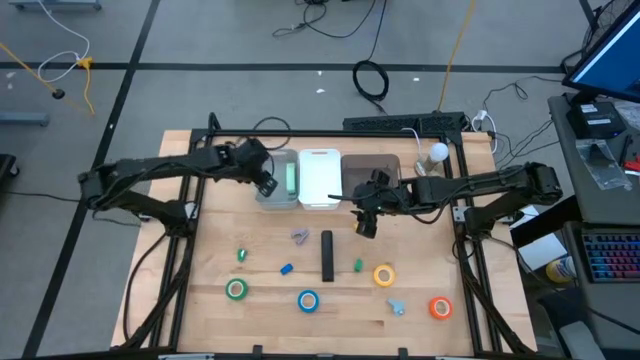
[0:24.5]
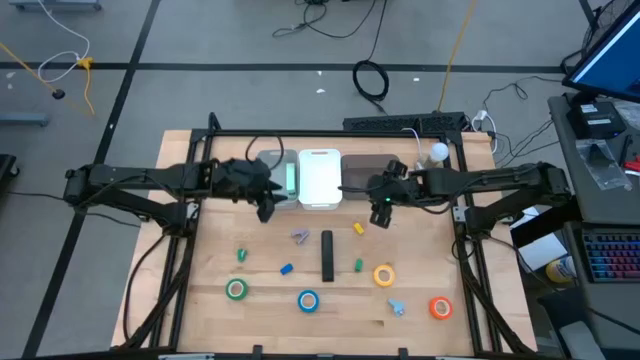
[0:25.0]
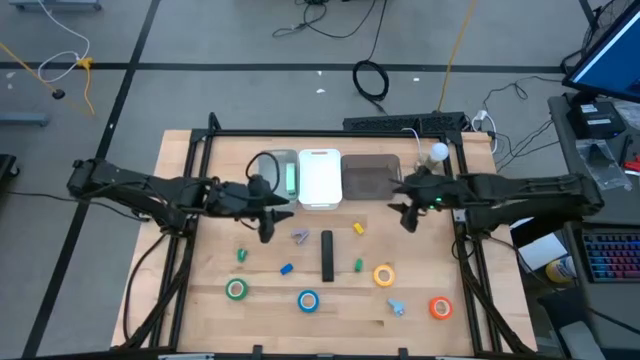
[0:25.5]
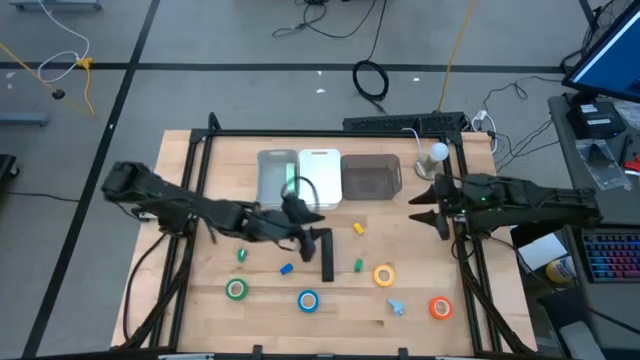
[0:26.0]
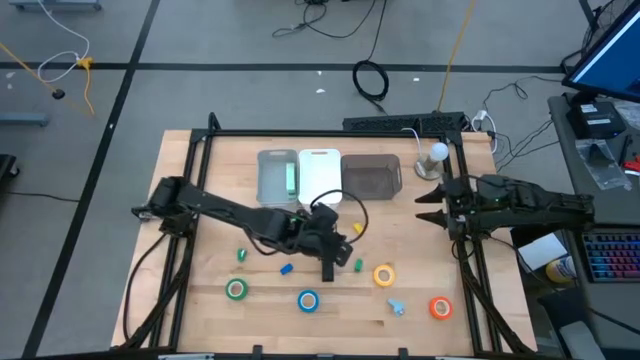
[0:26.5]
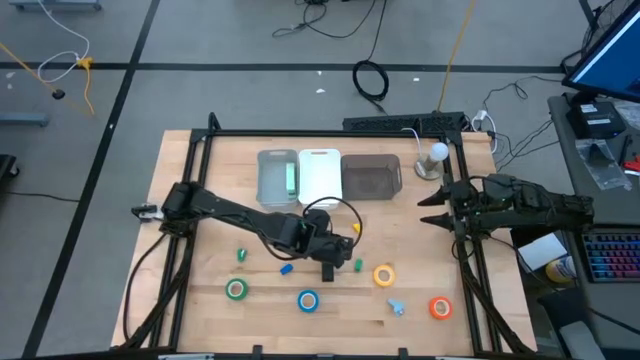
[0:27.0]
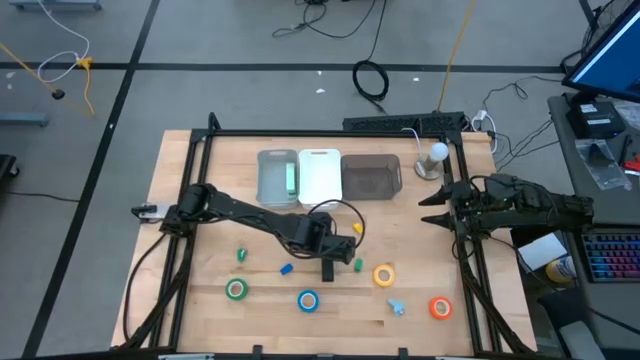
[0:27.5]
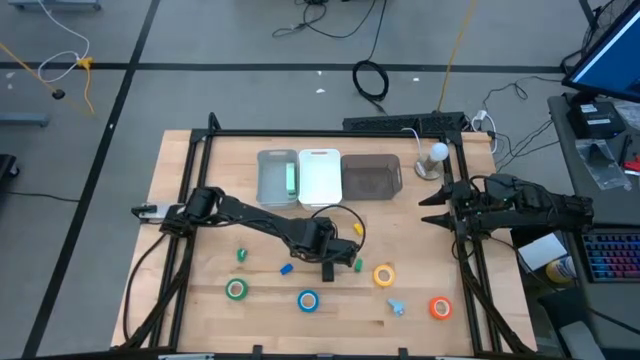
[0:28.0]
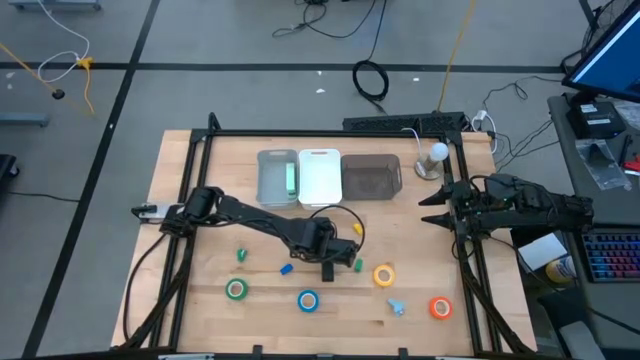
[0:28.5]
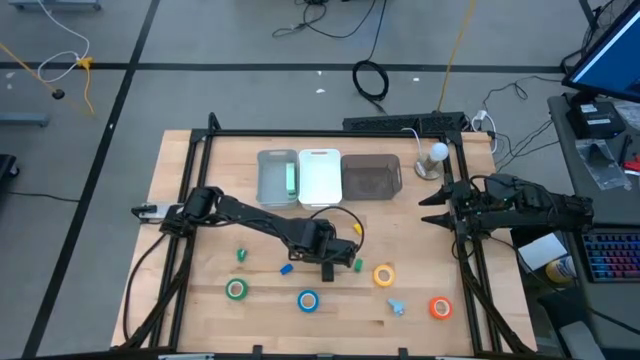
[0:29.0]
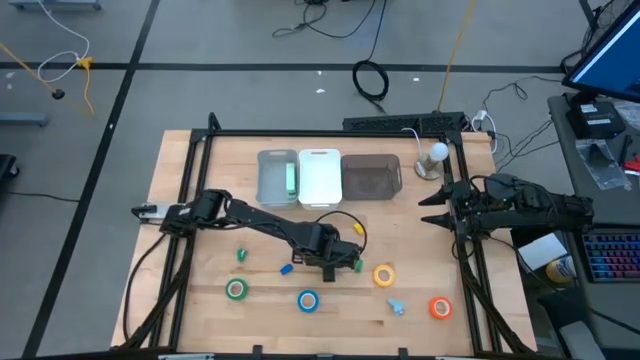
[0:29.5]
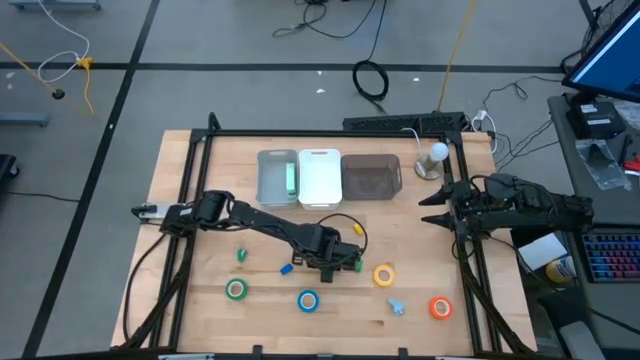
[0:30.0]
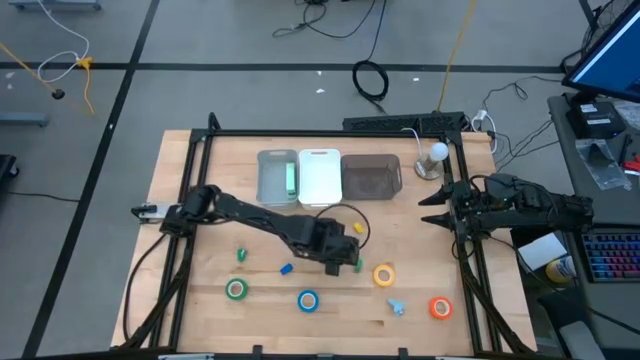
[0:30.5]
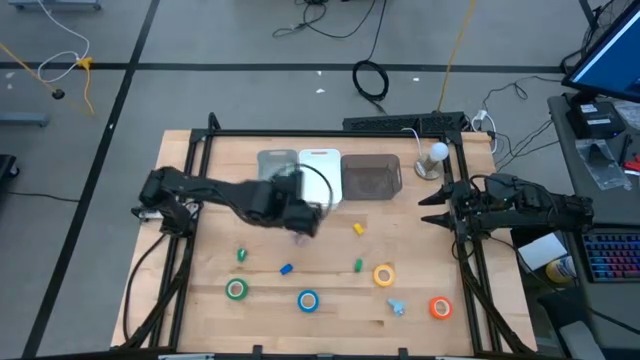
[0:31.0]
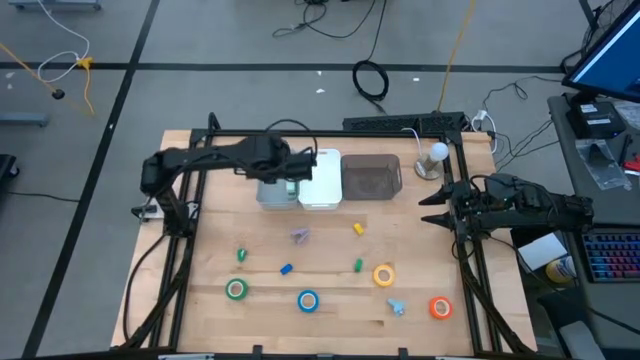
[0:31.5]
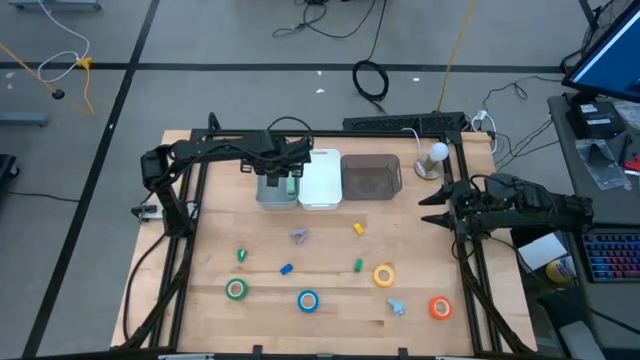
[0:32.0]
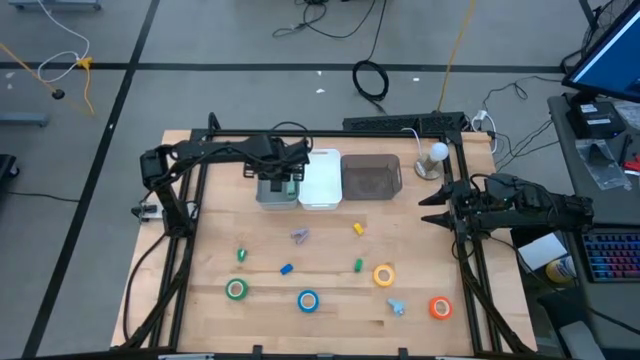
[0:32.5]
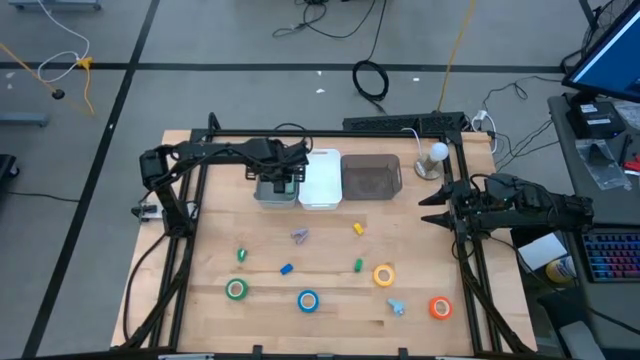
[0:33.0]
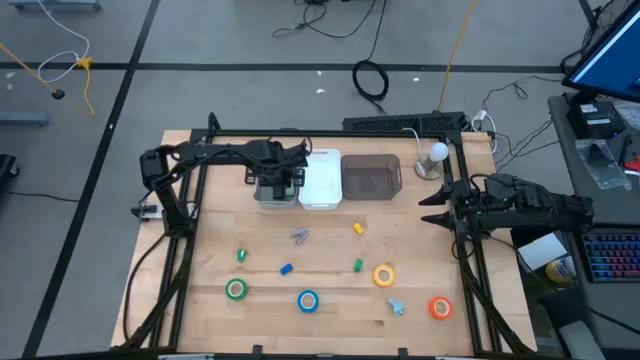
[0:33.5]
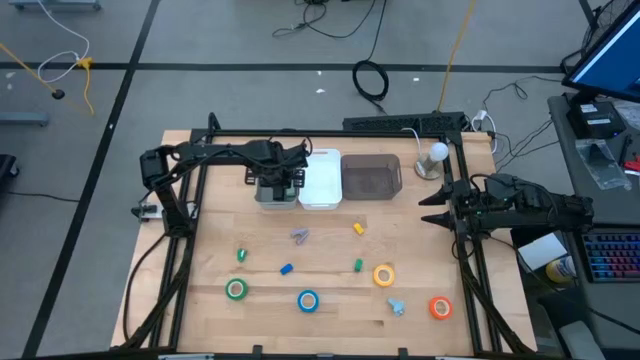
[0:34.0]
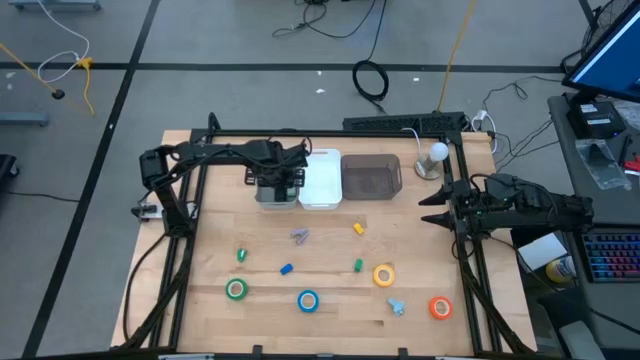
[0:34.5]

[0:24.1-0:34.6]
Task: Pick and place Stapler, Stapler remover, tape
Put the black stapler into the gray bin

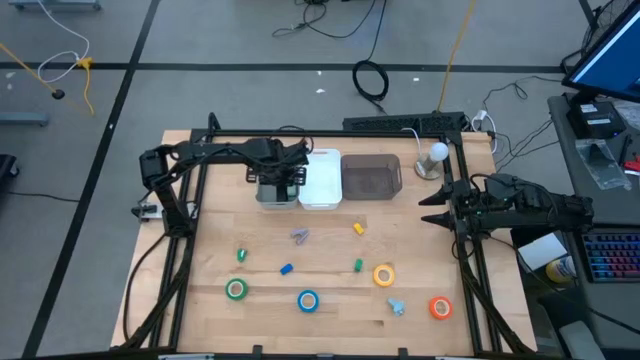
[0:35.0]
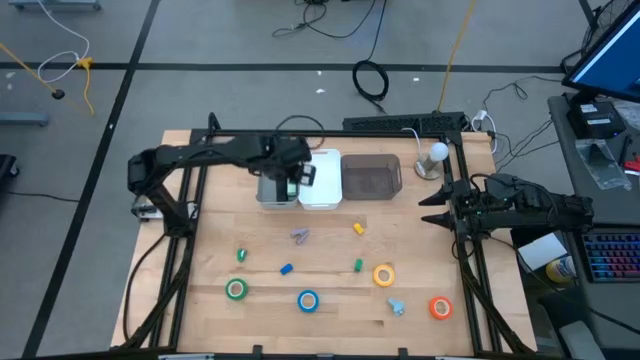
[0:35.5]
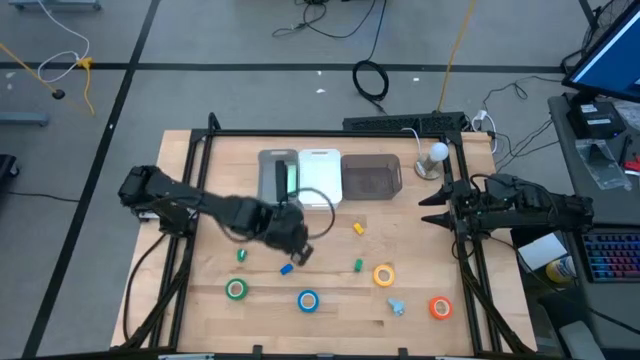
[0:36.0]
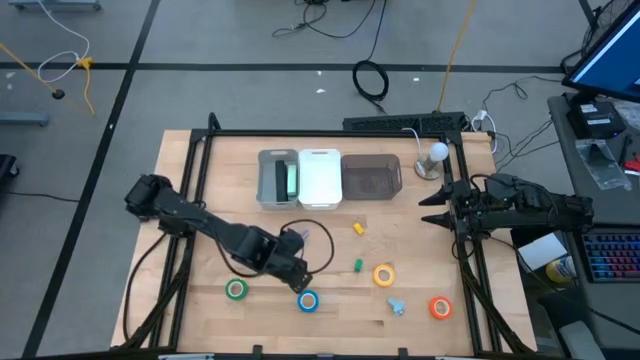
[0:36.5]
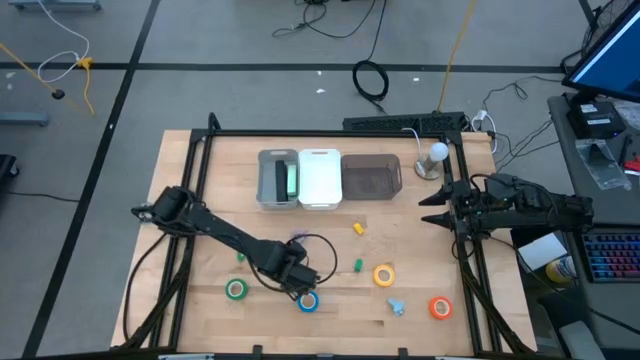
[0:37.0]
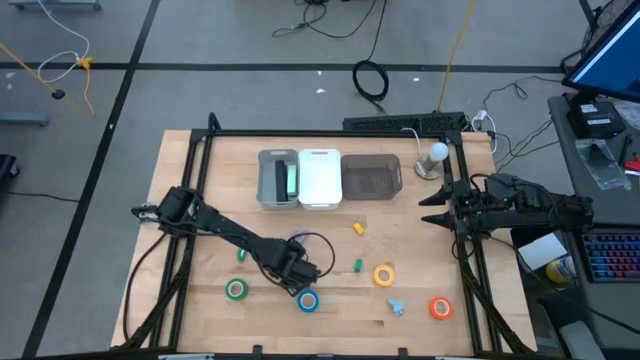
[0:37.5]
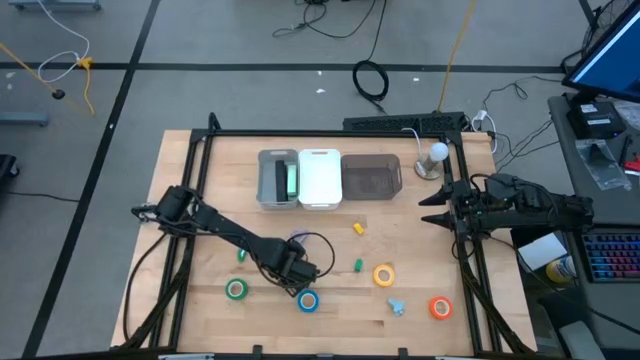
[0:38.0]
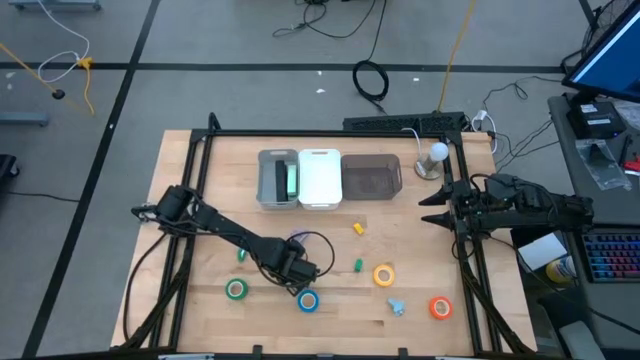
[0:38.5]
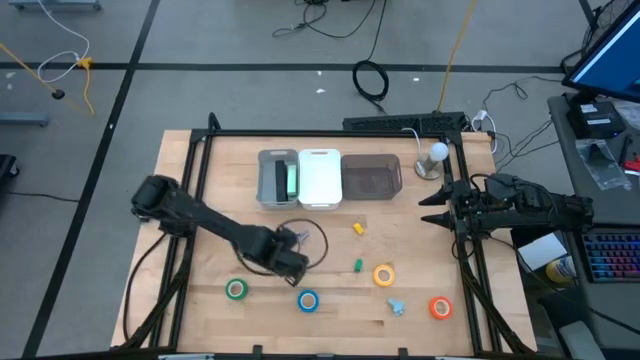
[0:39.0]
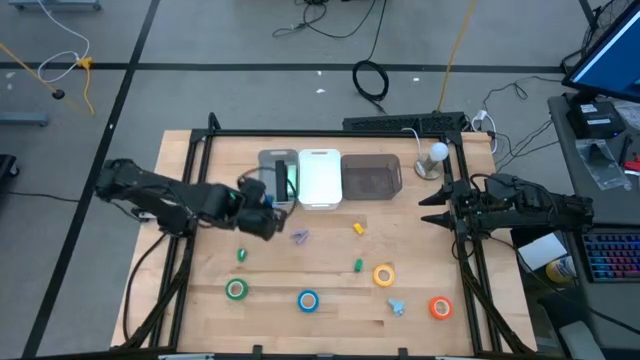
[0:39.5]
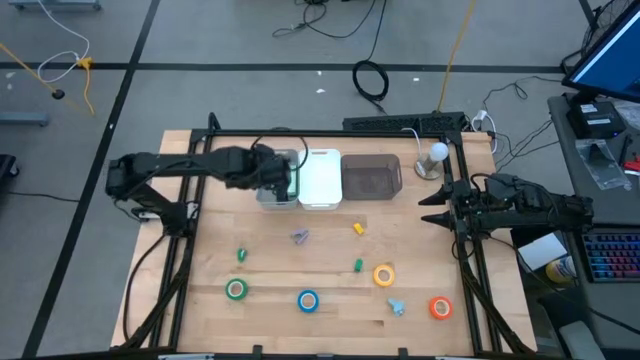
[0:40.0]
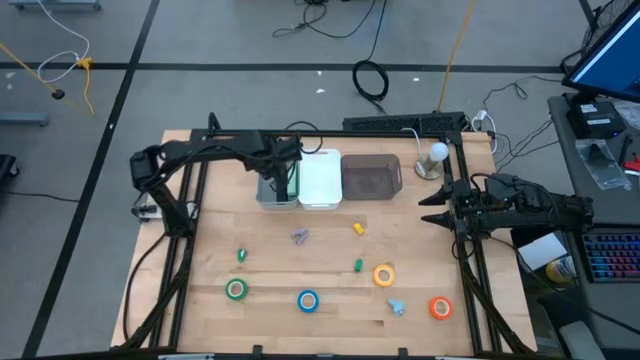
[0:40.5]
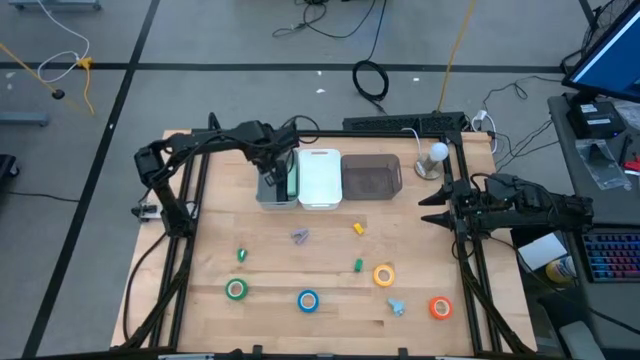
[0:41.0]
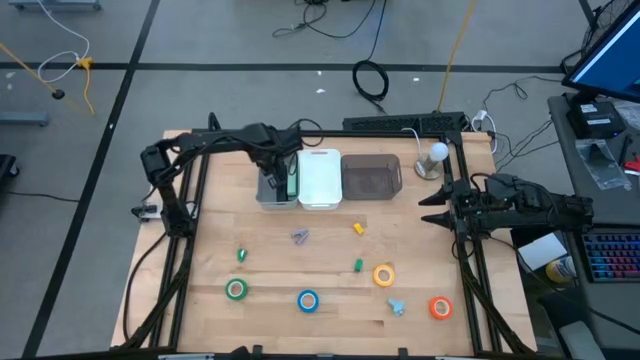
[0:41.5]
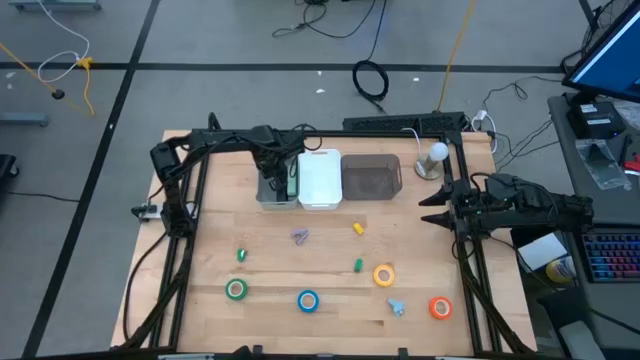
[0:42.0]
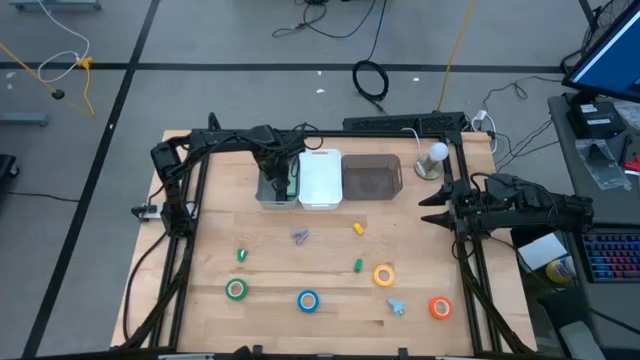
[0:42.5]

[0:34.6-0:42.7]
Put the blue stapler into the gray bin

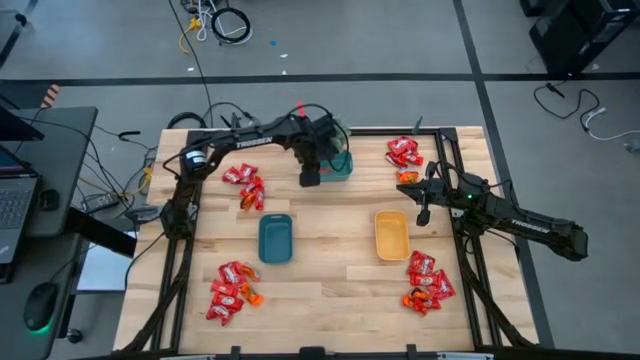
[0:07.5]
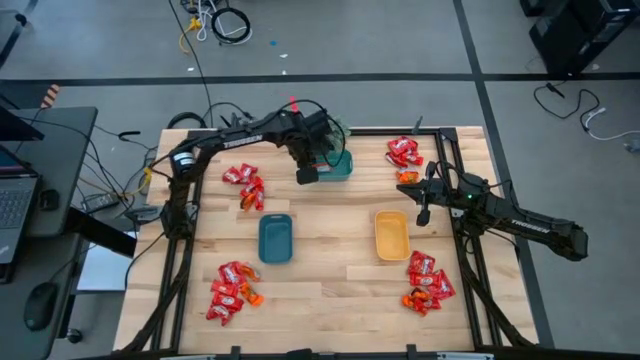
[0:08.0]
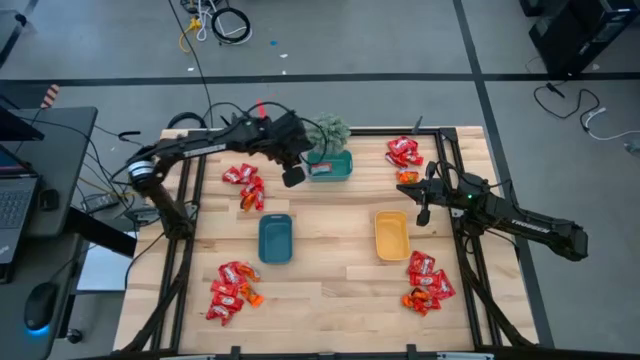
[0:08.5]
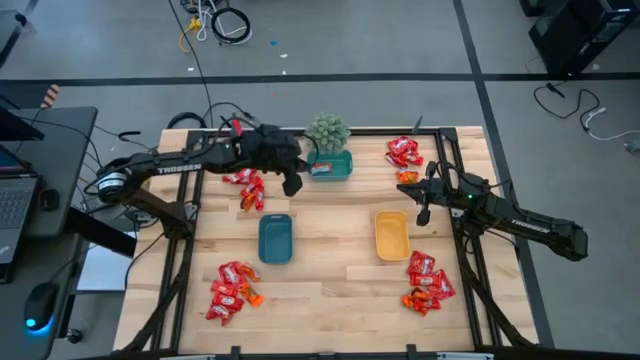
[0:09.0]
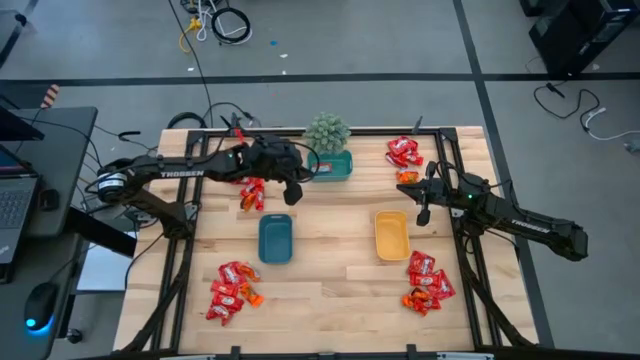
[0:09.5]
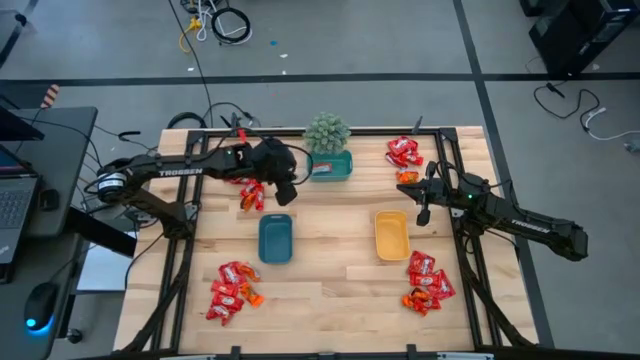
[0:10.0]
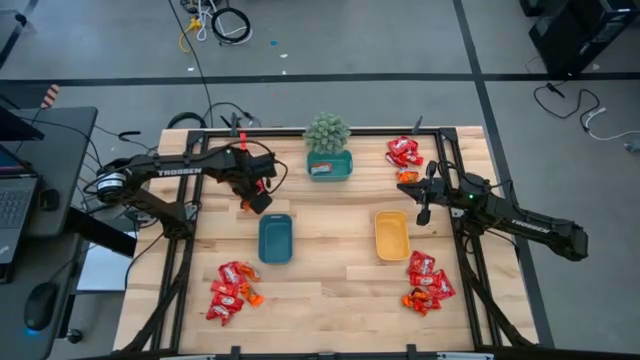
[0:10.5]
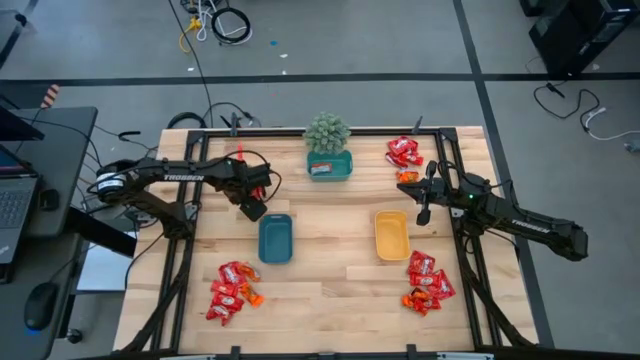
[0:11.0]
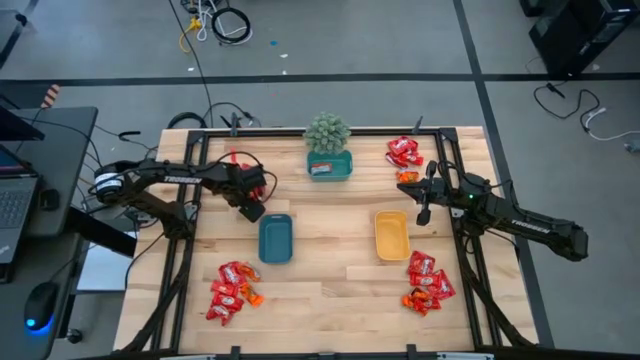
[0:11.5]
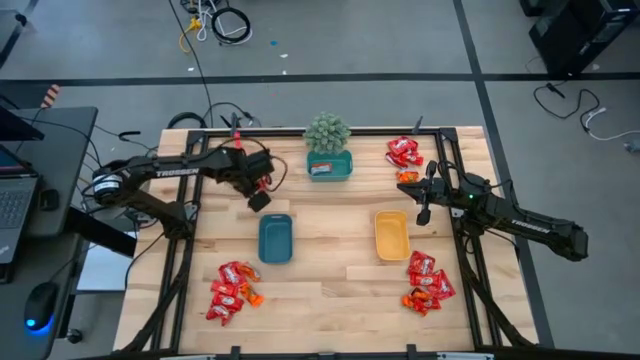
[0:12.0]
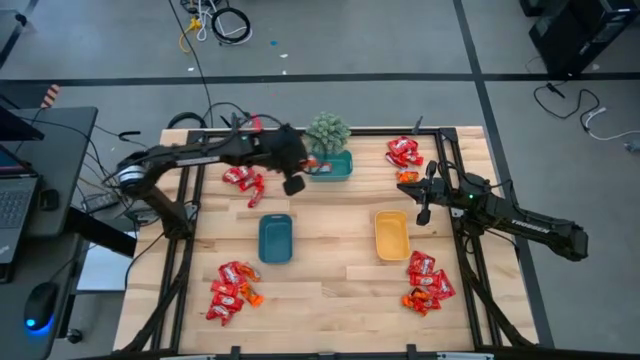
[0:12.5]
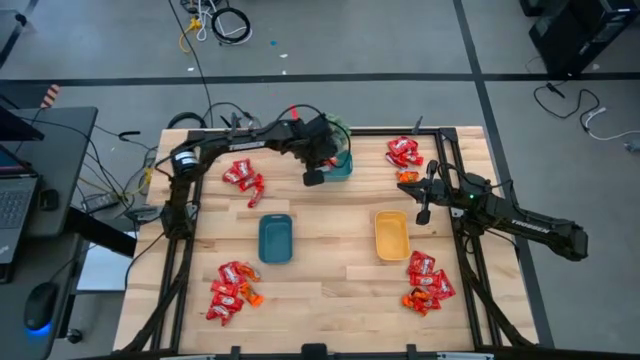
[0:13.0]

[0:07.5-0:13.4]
Task: Sort candy
Put the orange chocolate into the green bin
